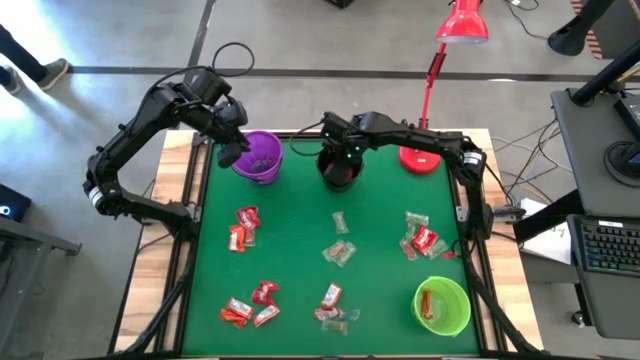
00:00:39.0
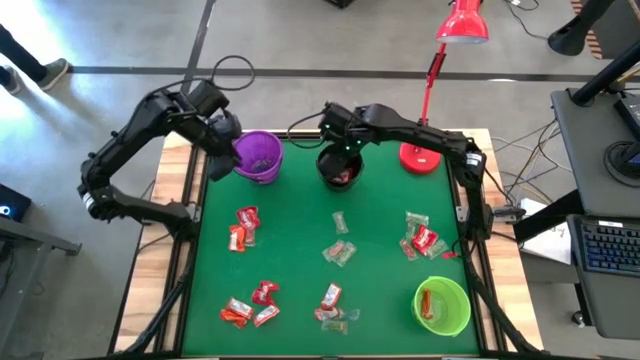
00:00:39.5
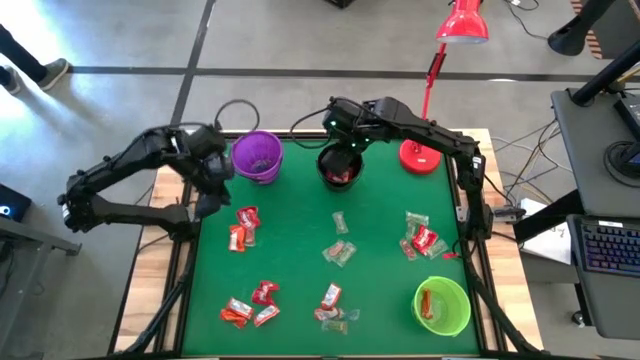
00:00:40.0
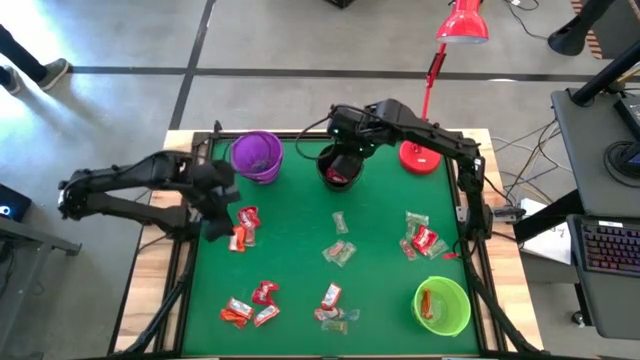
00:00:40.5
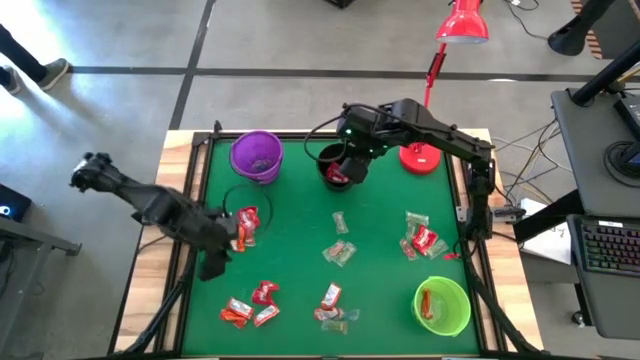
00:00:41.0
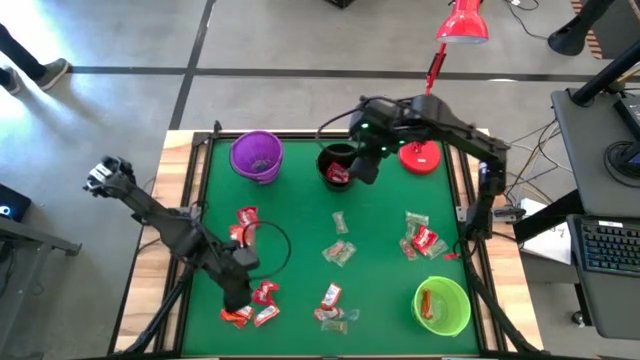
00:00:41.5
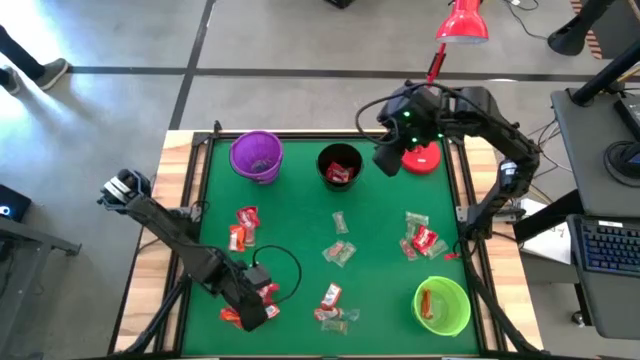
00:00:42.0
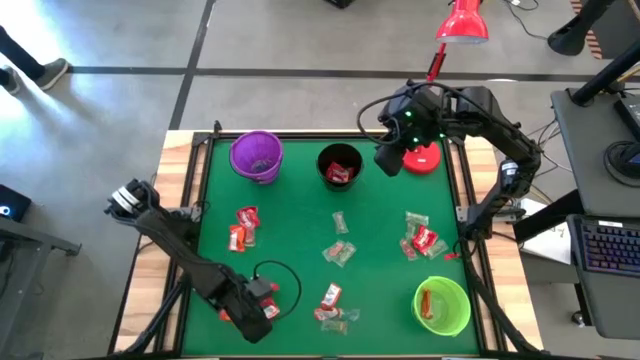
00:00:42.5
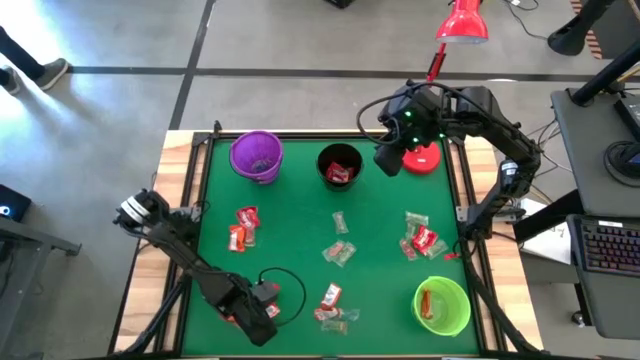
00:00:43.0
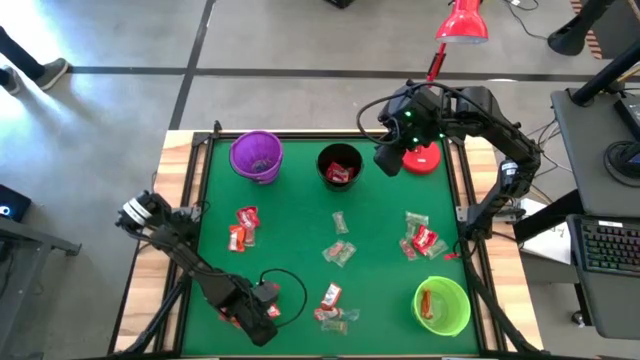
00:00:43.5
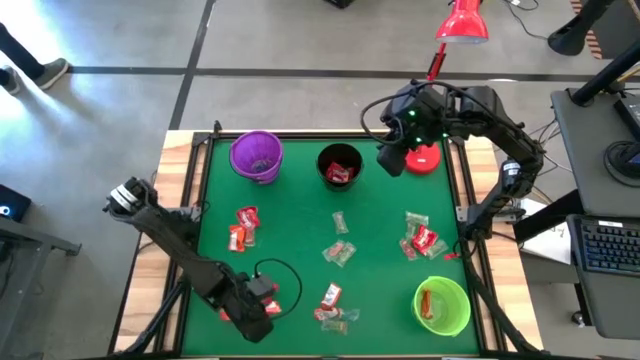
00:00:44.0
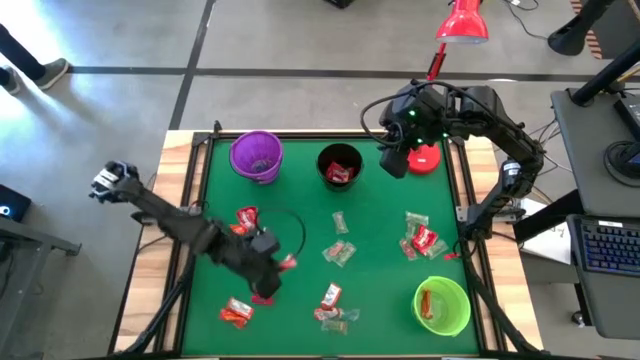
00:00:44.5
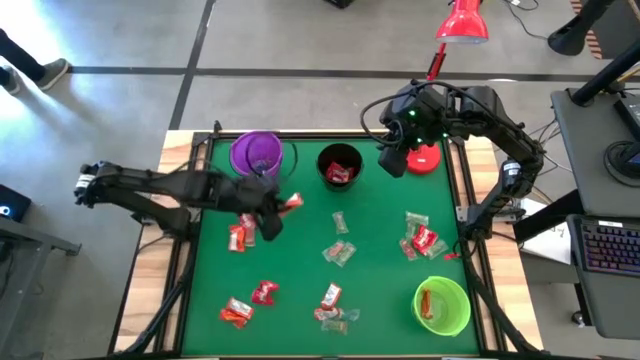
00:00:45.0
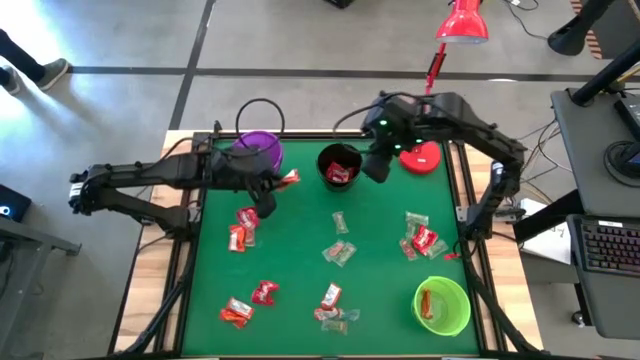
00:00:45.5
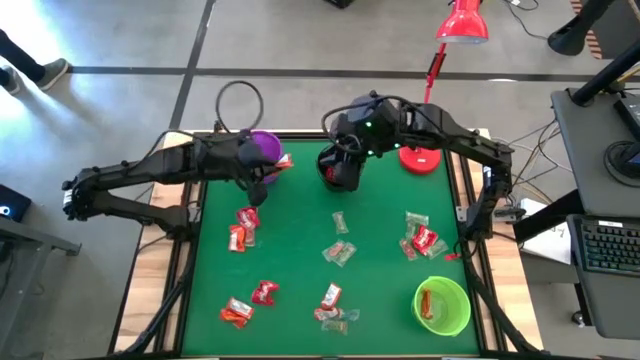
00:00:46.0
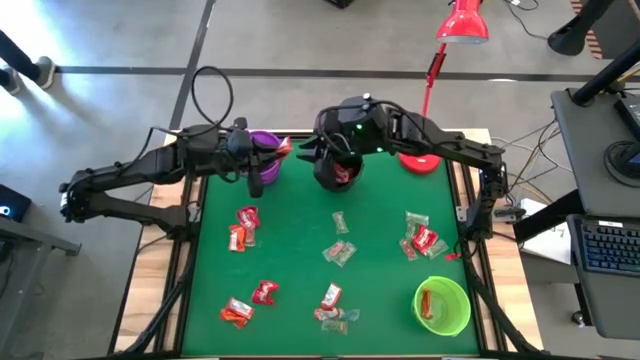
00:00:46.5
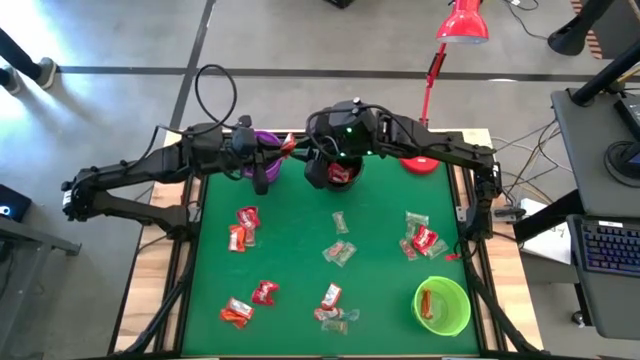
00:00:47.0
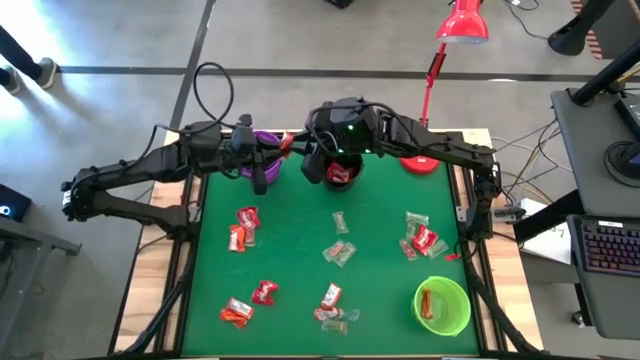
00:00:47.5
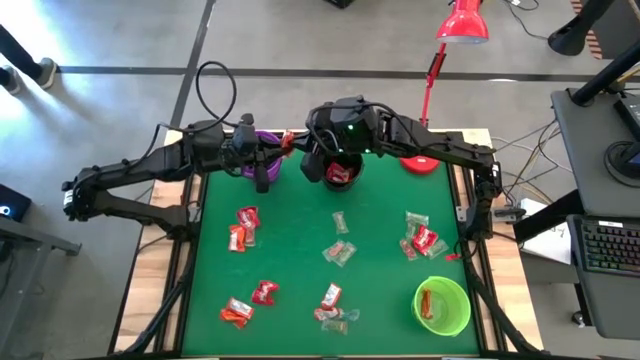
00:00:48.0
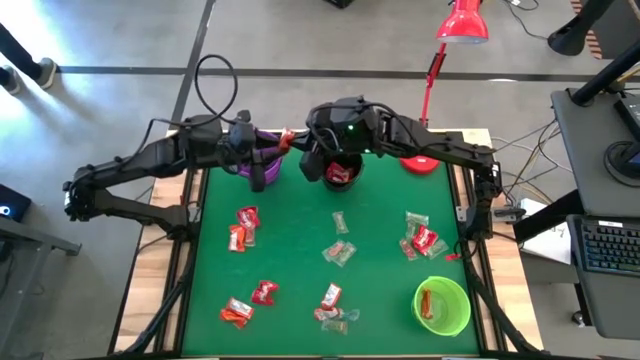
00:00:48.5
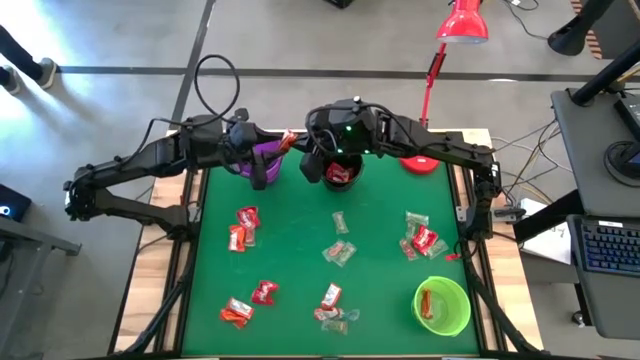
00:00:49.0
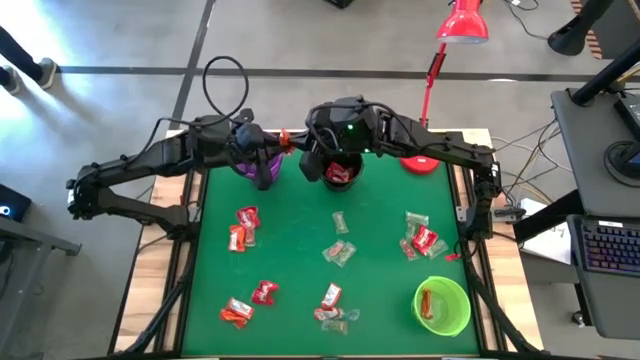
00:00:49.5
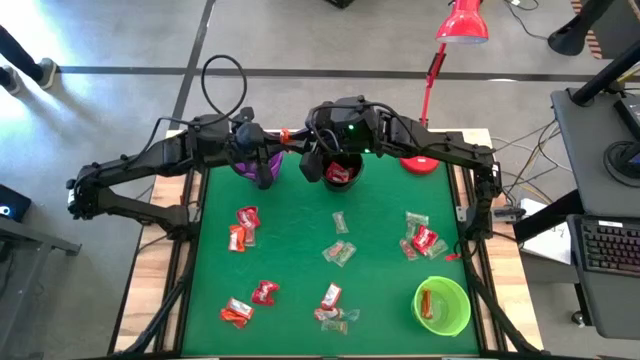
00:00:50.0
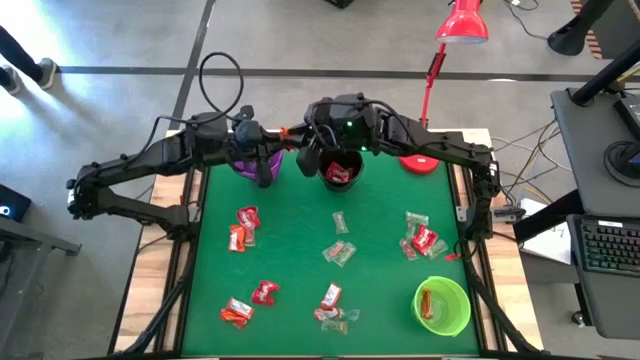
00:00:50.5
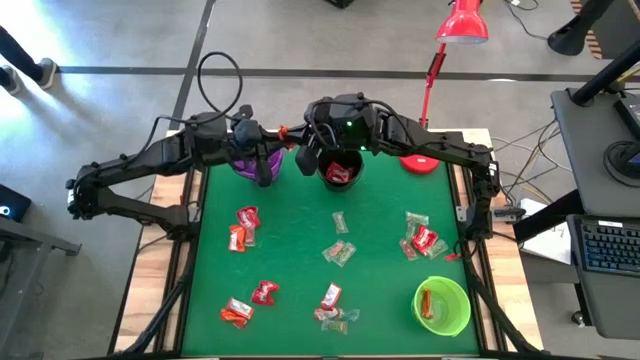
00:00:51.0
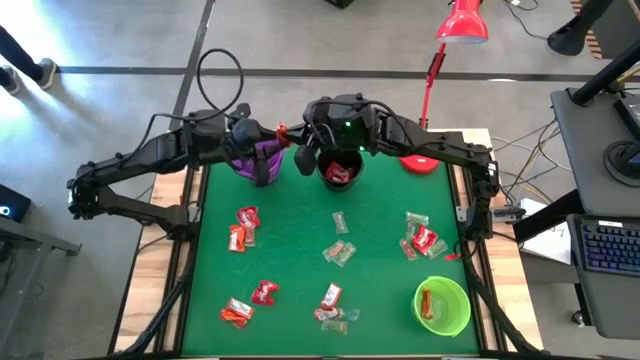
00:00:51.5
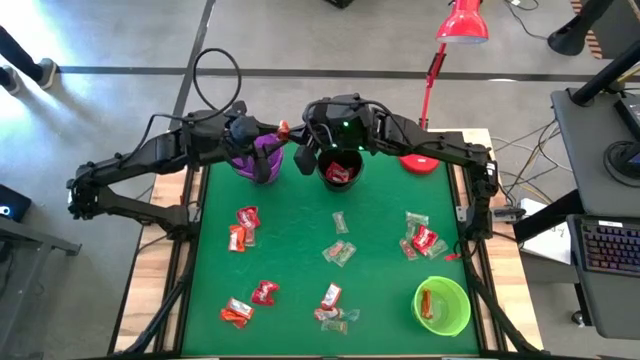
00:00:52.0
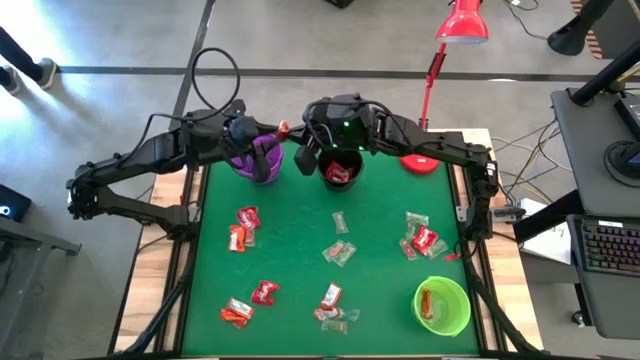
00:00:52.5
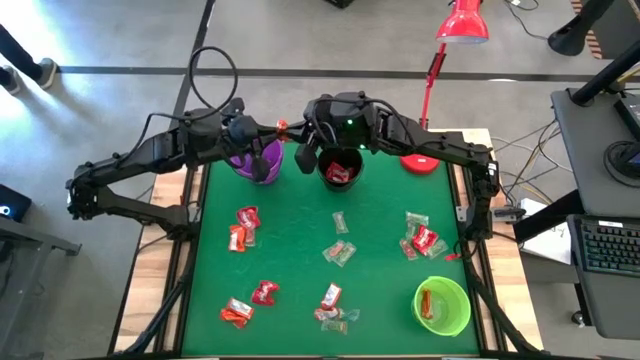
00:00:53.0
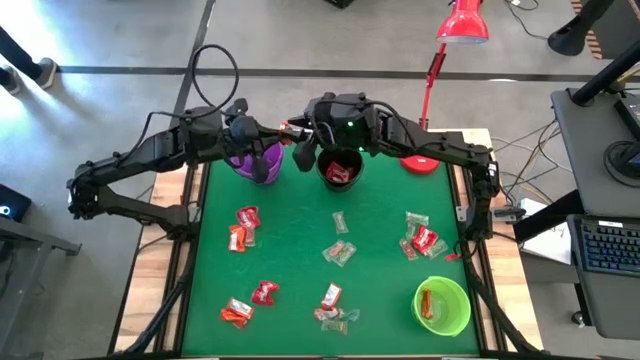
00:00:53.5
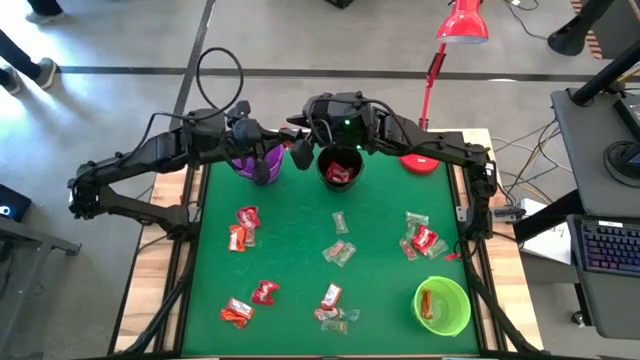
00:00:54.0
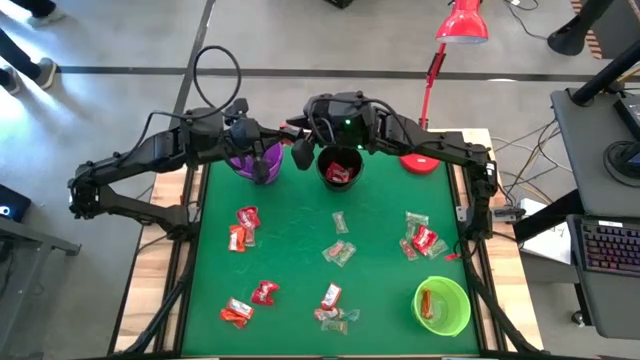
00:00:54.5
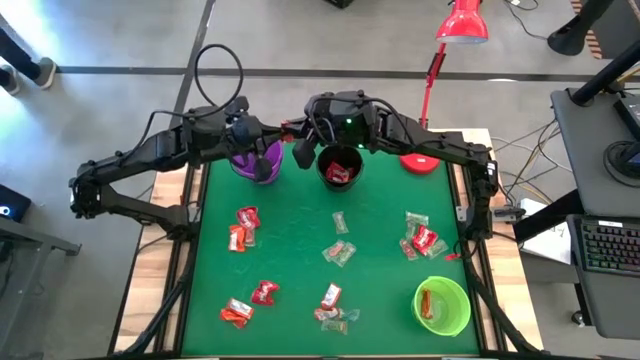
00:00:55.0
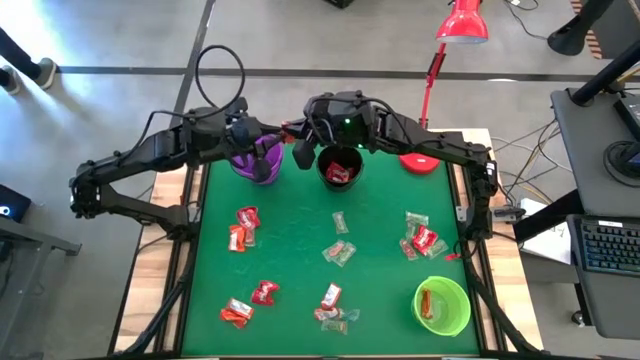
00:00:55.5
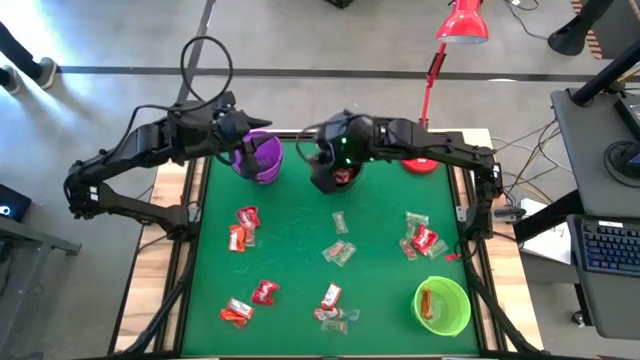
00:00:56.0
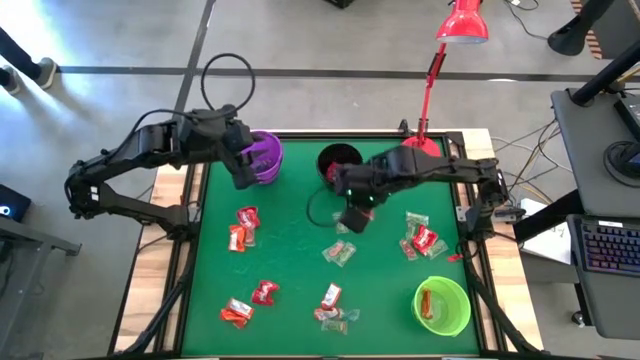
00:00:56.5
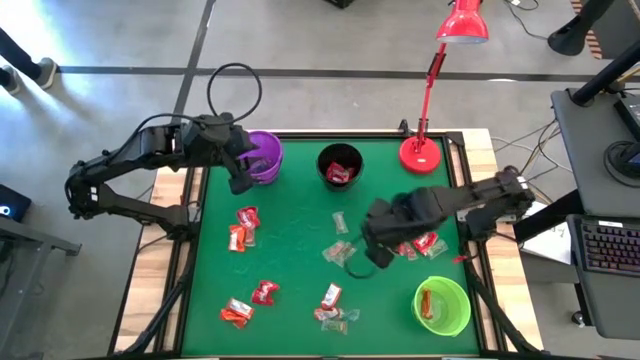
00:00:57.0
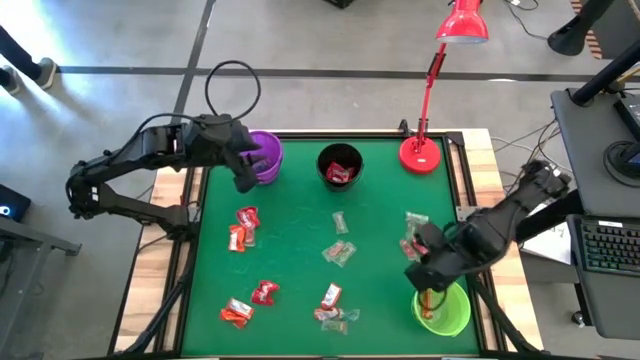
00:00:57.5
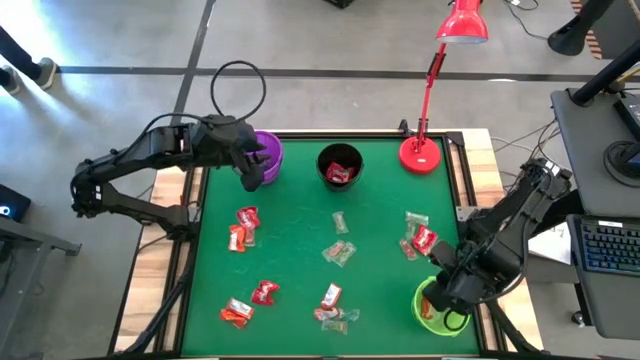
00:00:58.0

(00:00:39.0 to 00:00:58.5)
Task: Sort candy
Put the orange chocolate into the green bucket

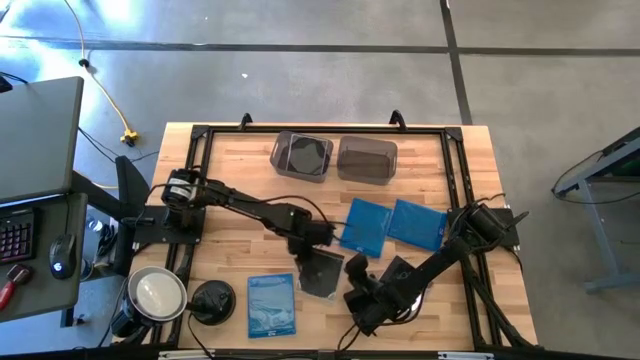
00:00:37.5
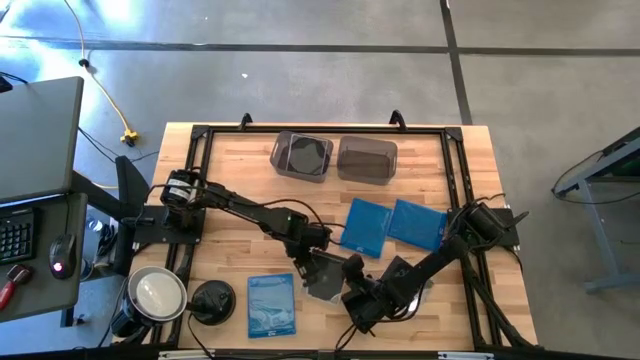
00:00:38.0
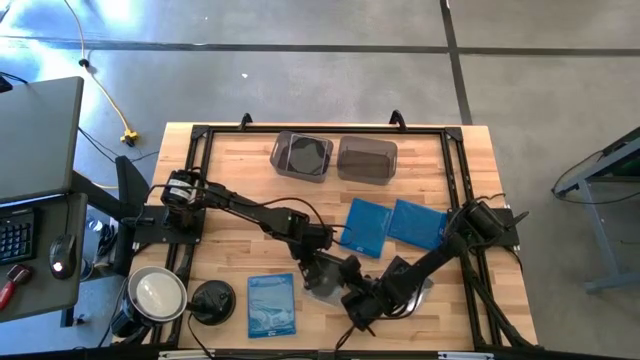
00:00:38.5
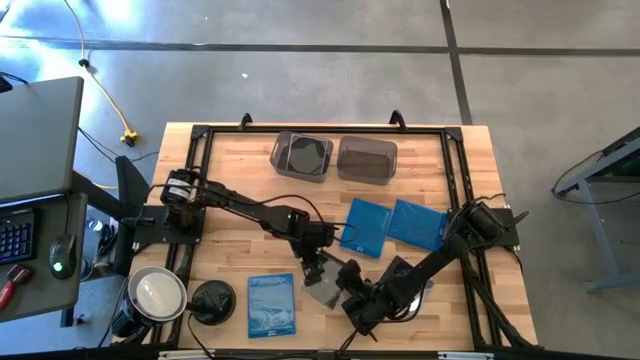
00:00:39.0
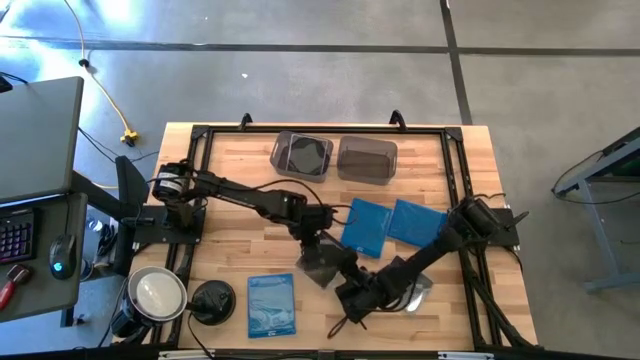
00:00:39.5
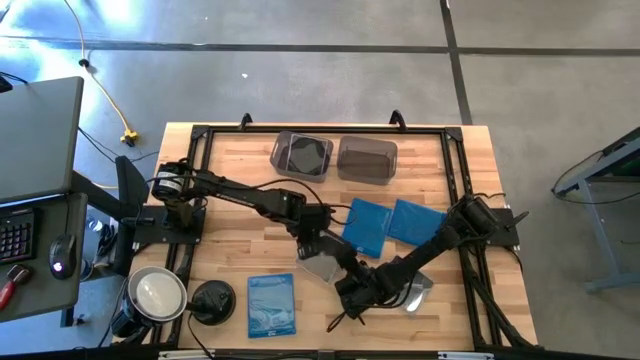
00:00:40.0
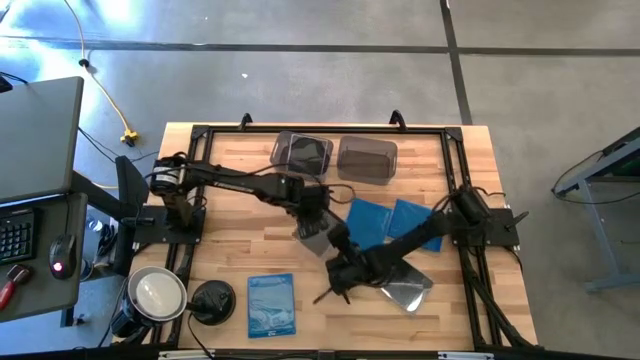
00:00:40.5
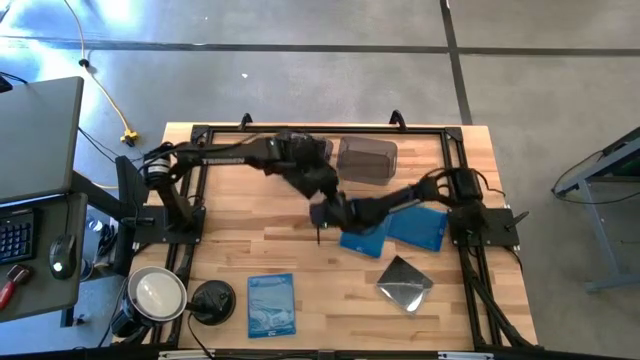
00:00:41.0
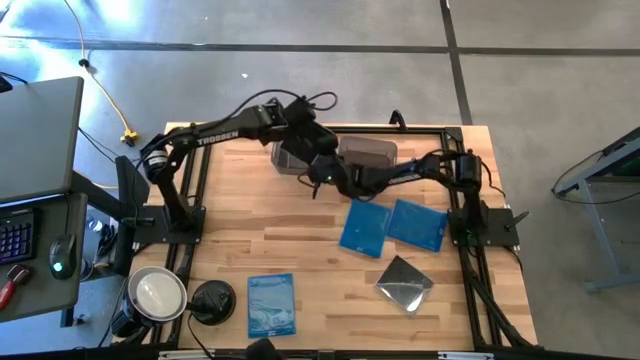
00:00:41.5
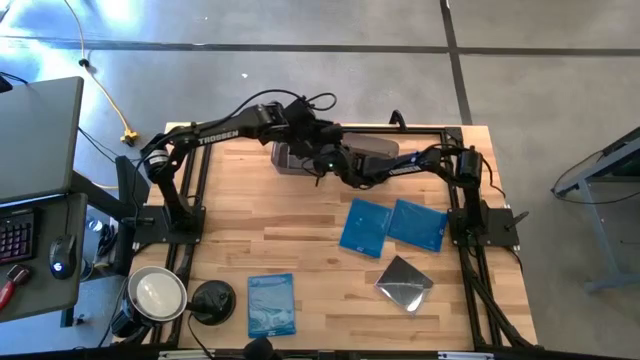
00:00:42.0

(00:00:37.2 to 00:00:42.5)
Task: Pick & place jewel cases by type
Put the left black cd case into the left black bin
